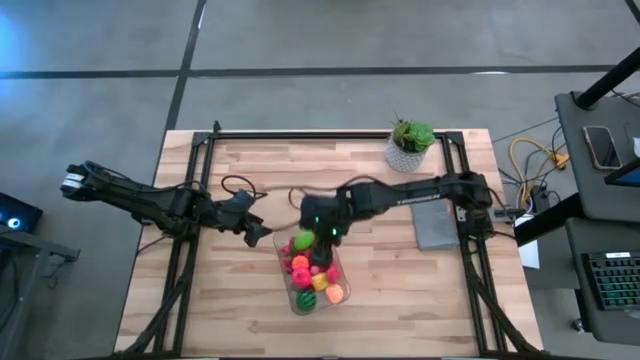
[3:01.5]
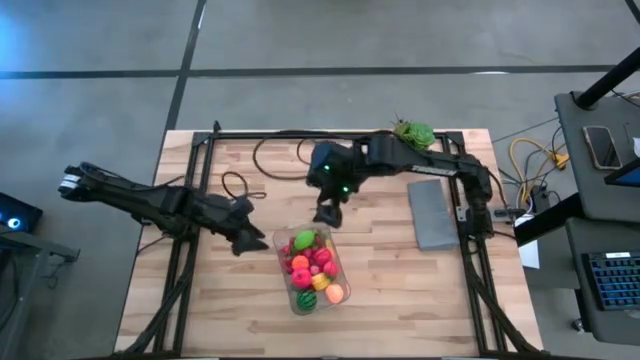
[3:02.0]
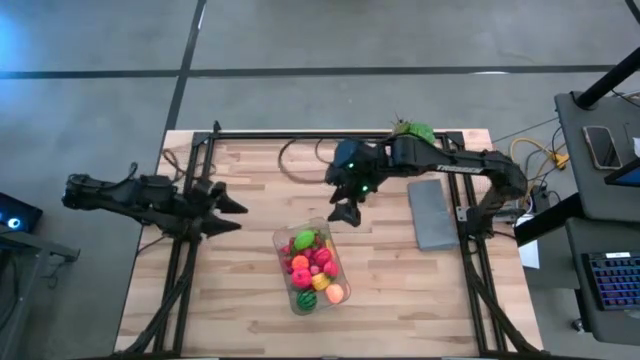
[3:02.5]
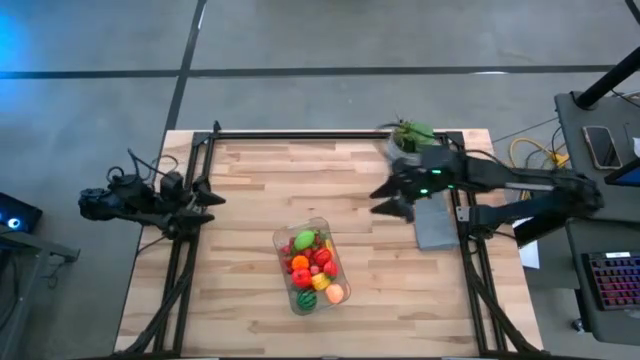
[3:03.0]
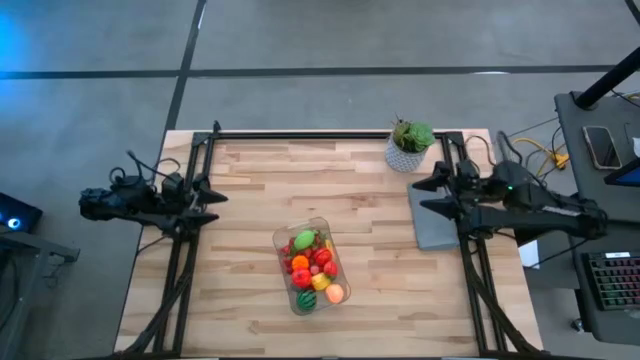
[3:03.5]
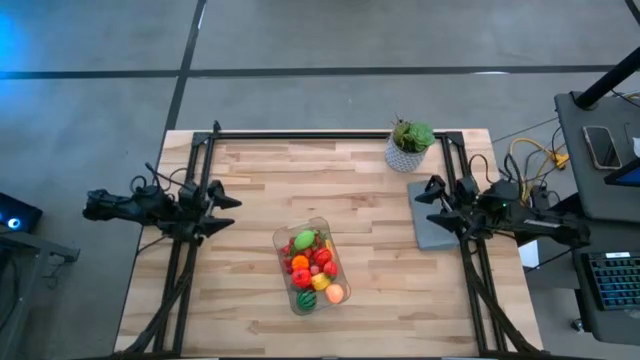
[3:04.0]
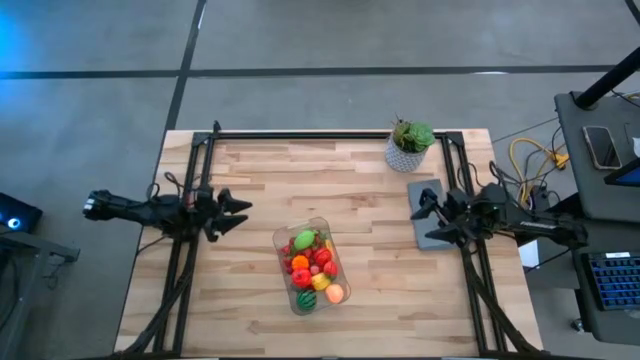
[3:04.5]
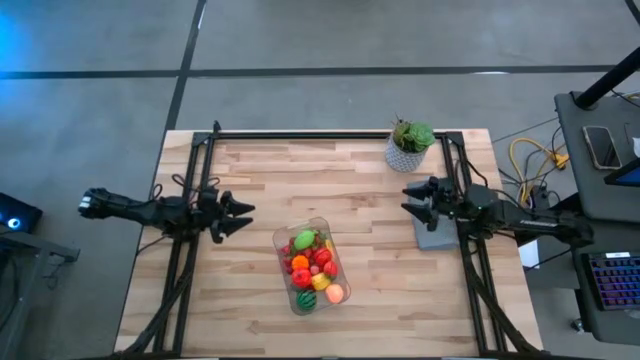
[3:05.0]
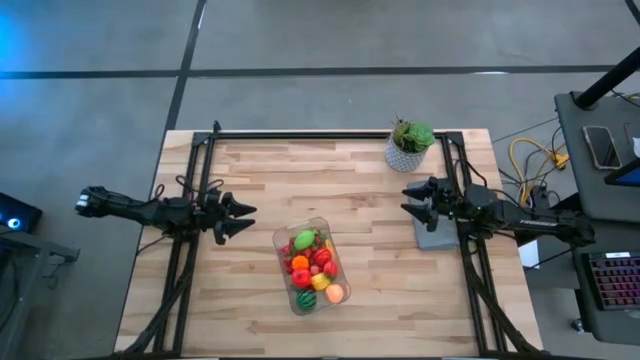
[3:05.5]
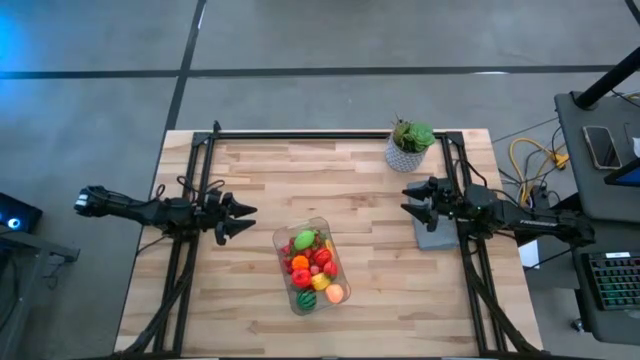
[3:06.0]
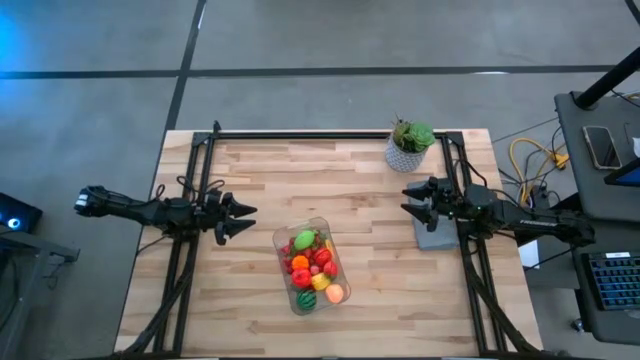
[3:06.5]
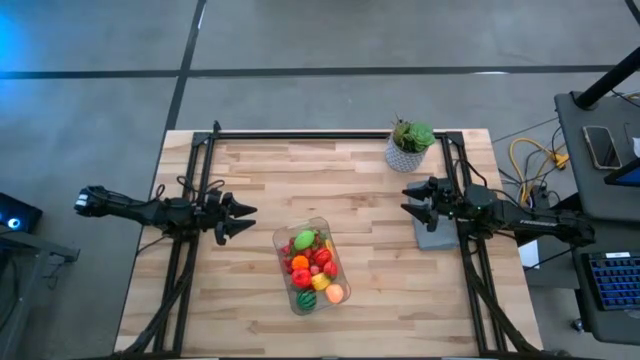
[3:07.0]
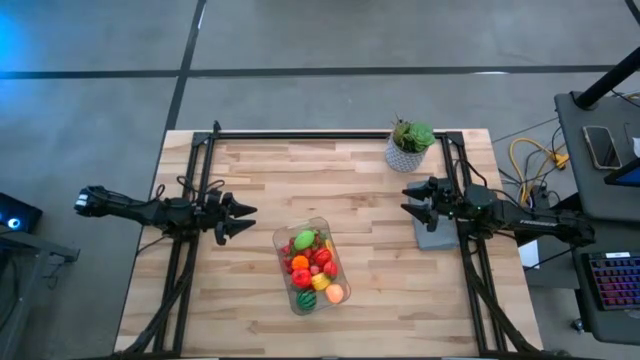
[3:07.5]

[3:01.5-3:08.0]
Task: Pick and placing Produce into tupperware
Return to Home Position

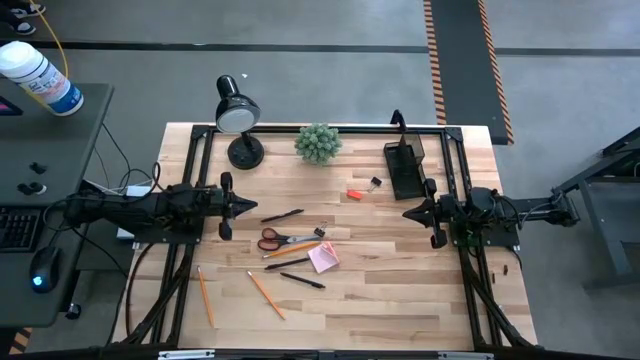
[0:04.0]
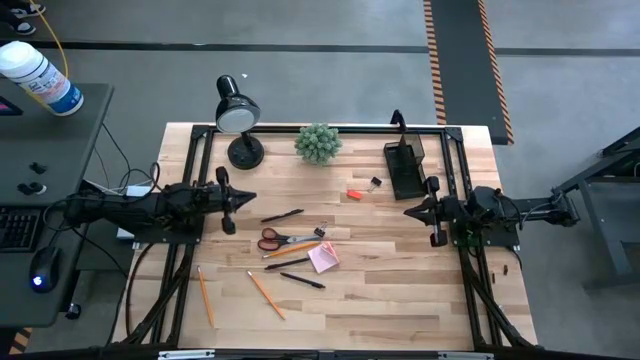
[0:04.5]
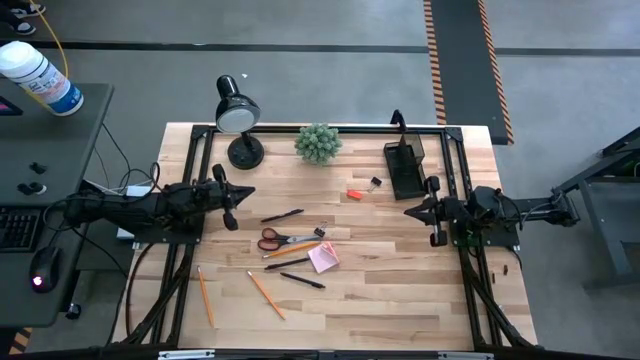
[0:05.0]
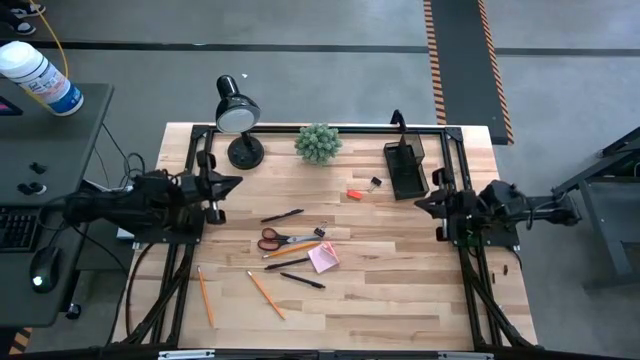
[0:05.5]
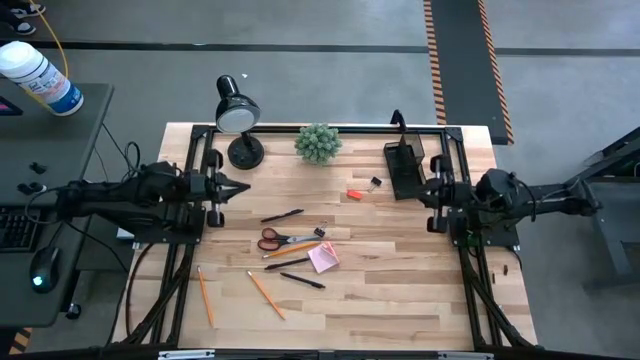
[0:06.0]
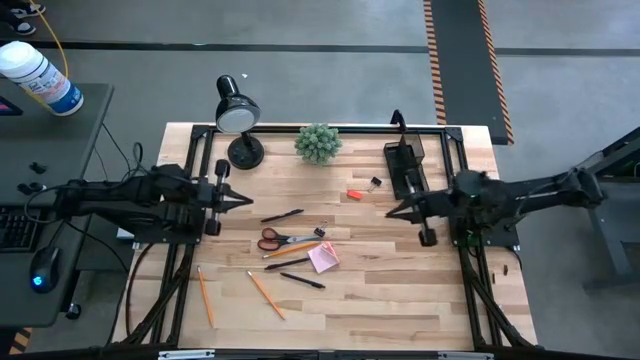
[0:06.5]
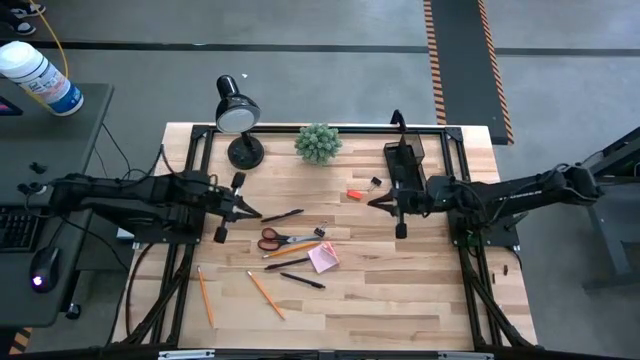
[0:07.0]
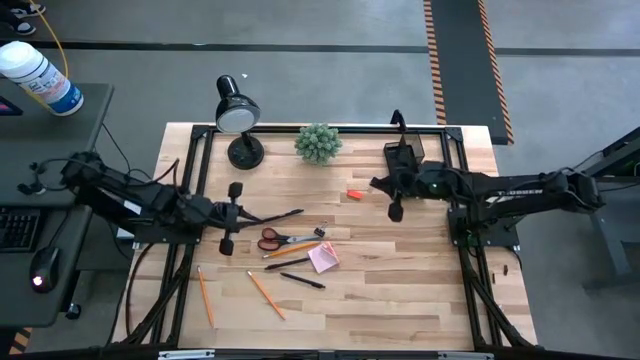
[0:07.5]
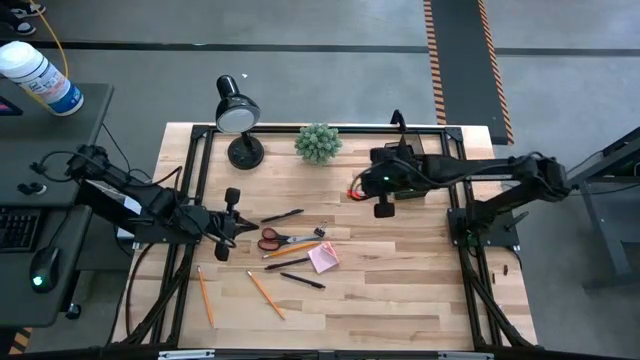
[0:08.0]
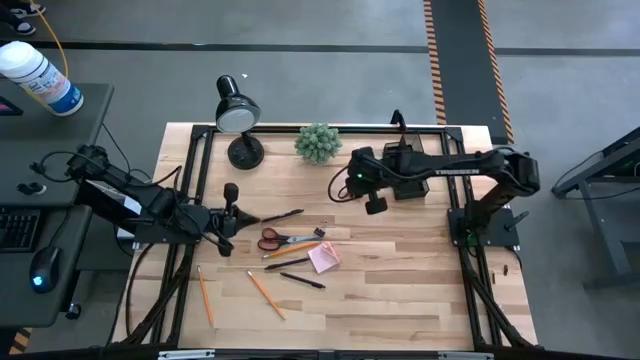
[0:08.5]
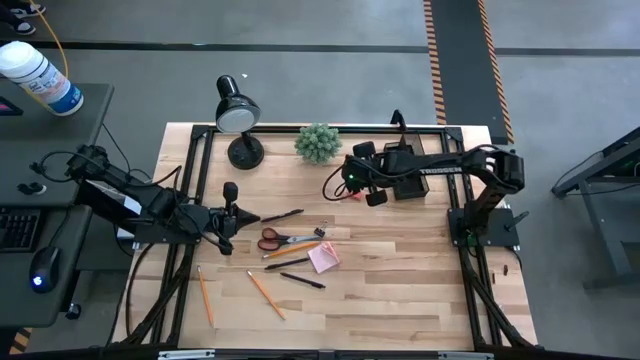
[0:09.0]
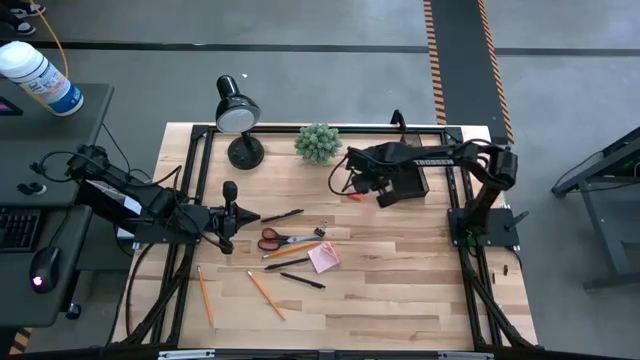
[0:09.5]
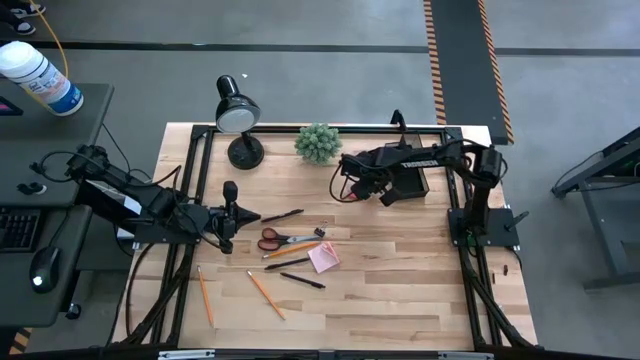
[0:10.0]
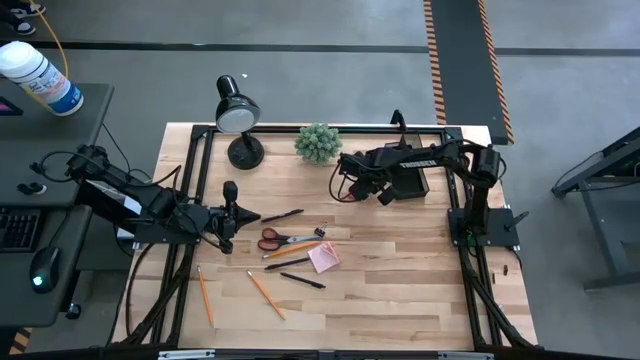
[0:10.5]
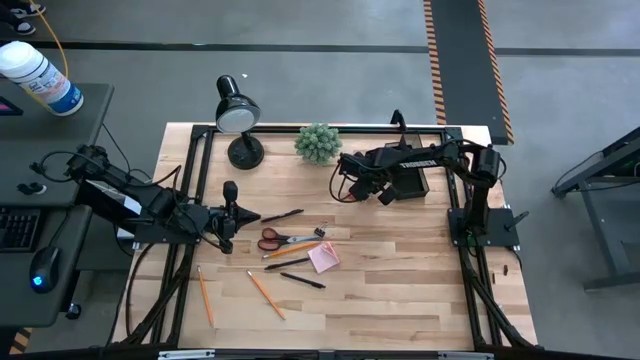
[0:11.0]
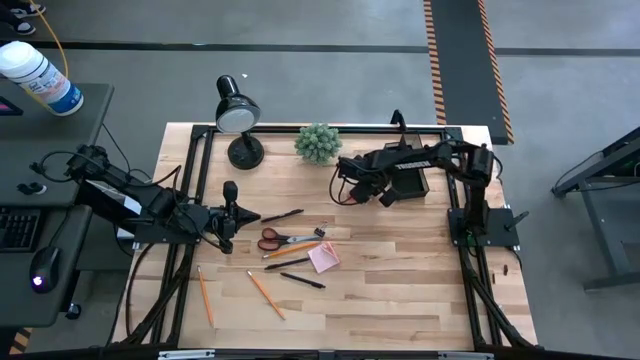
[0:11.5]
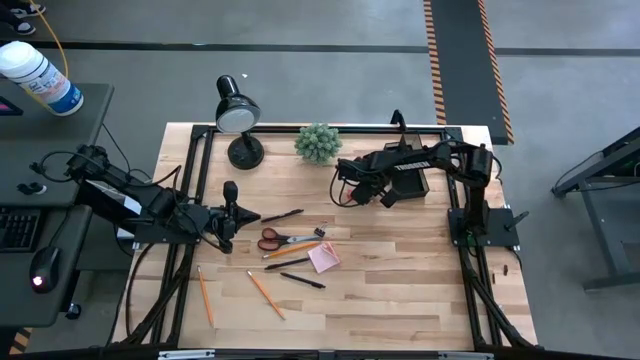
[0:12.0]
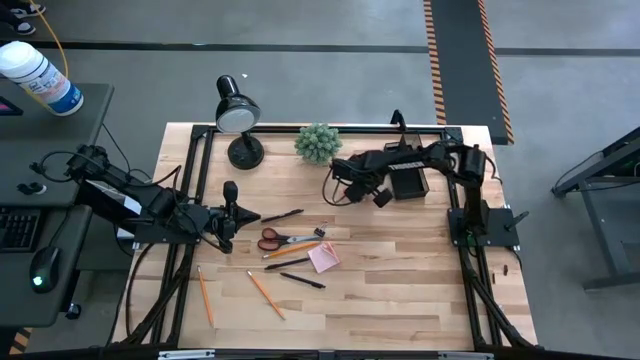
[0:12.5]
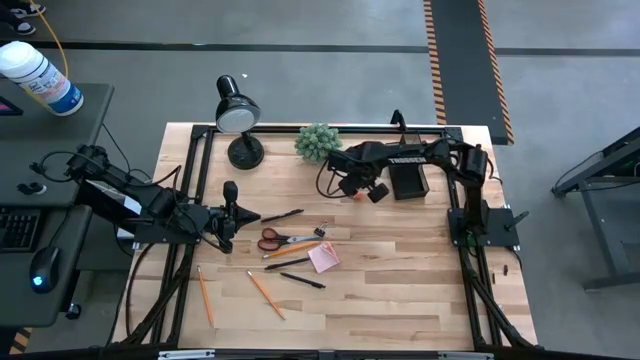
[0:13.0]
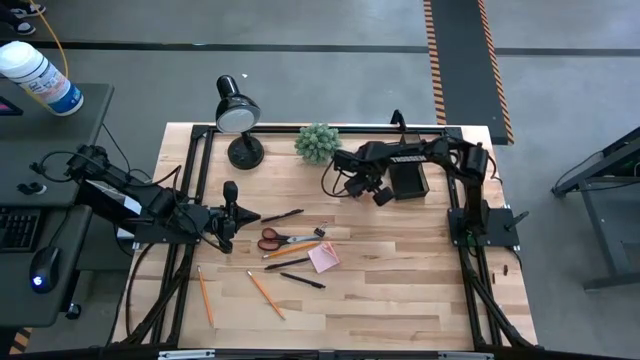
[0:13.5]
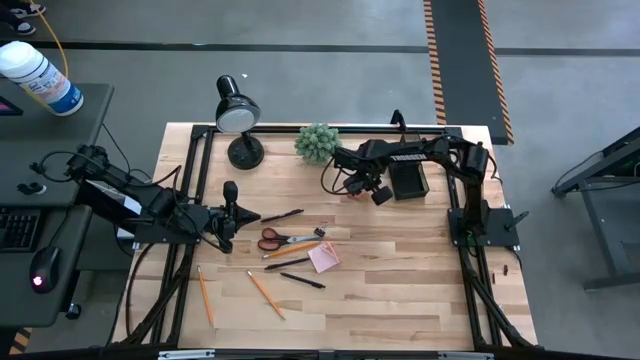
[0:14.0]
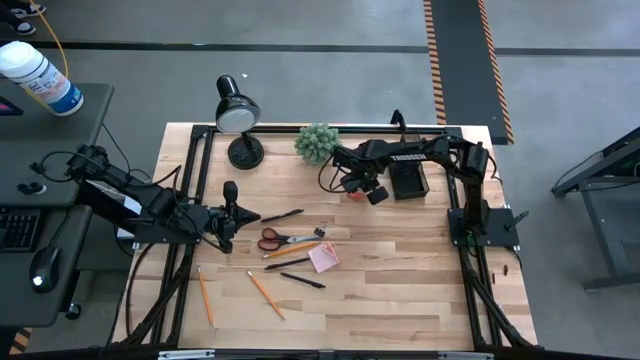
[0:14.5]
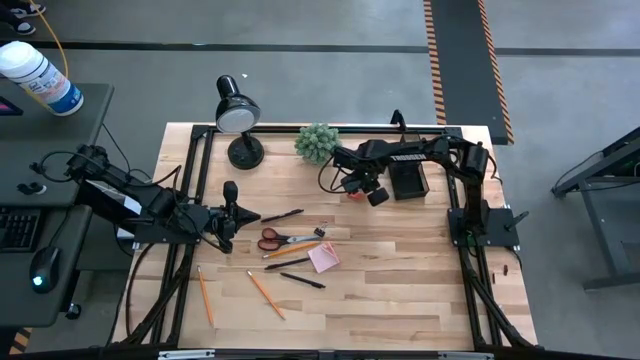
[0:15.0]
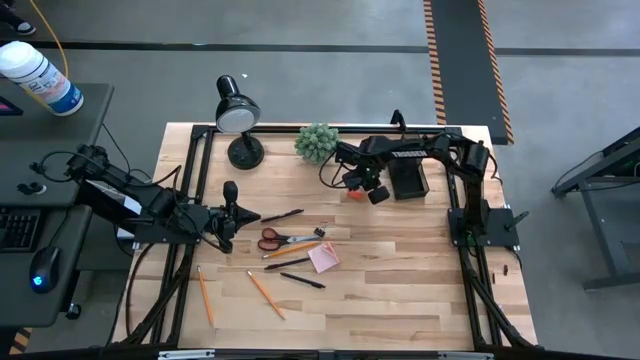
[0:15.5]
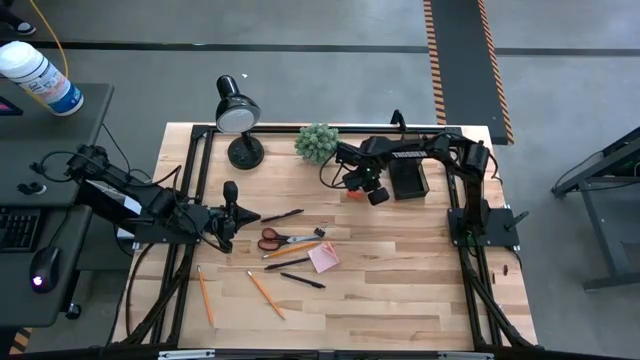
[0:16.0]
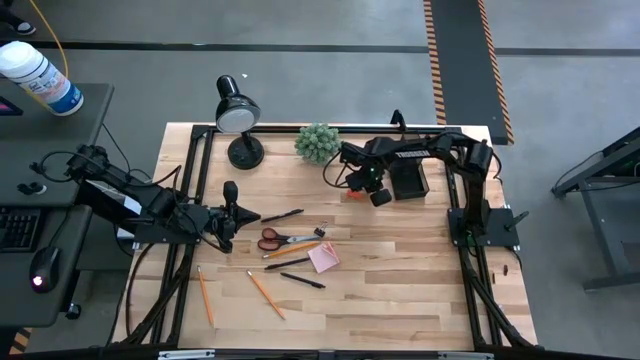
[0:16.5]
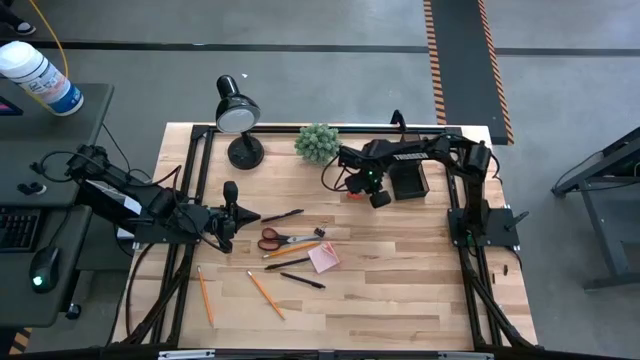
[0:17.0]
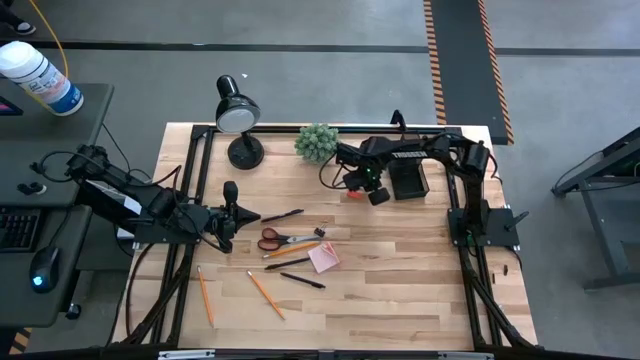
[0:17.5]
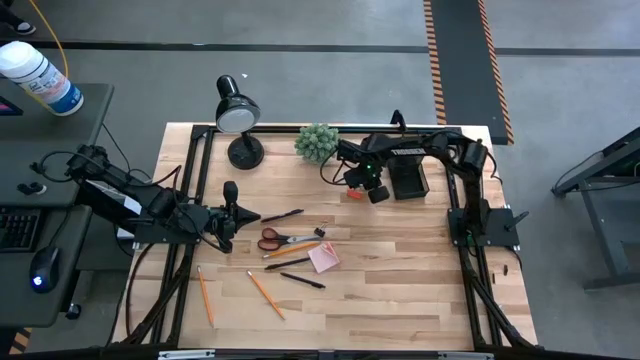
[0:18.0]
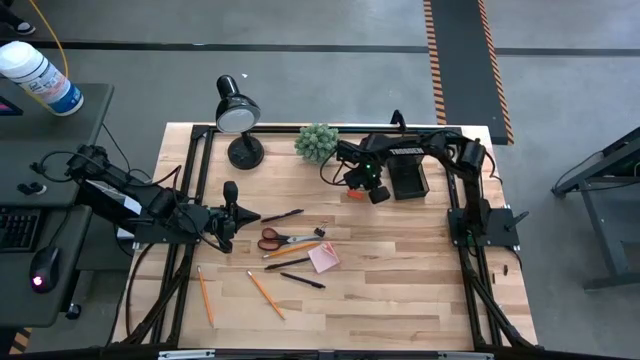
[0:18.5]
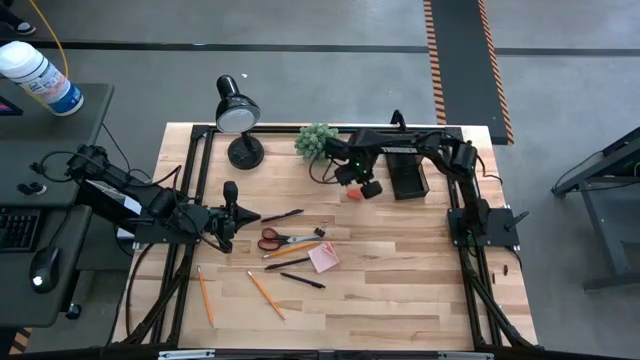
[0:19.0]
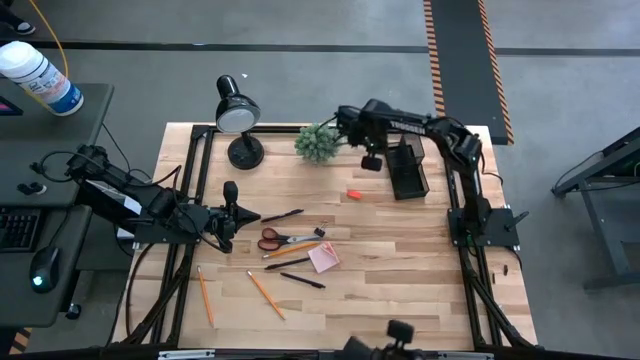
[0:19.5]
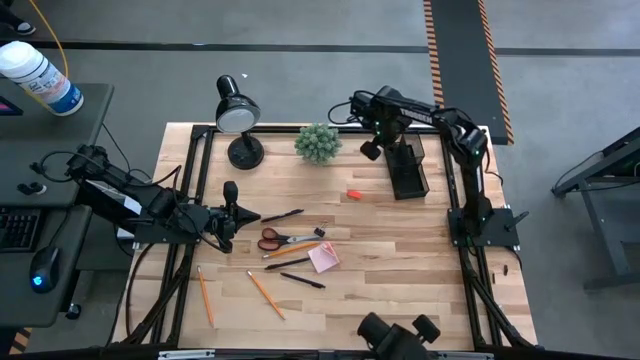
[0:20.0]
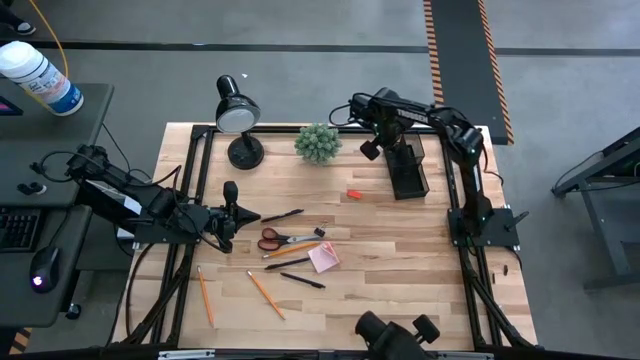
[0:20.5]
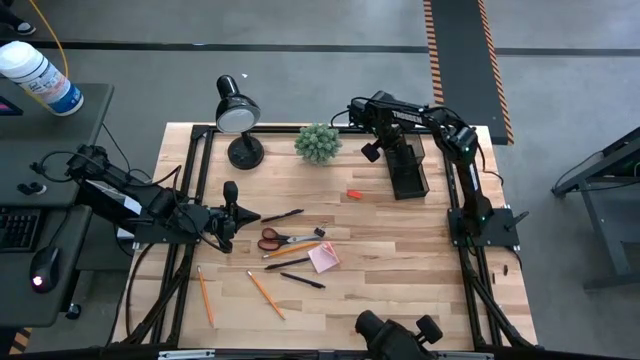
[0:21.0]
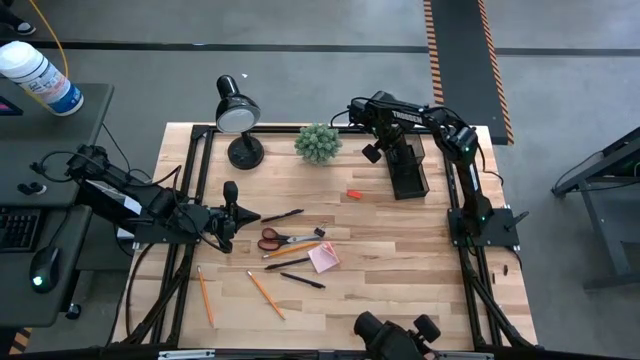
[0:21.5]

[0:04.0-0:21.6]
Task: Pick and place office supplies into organizer
Put the top binder clip into the desk organizer
